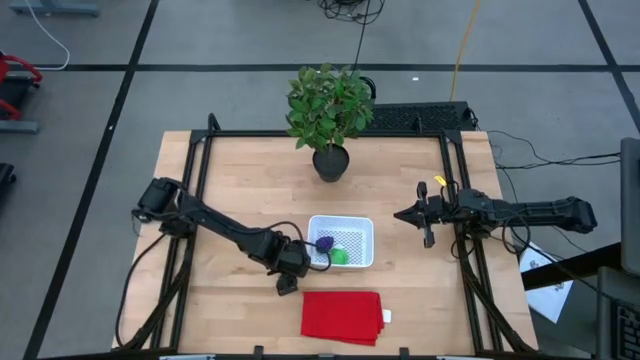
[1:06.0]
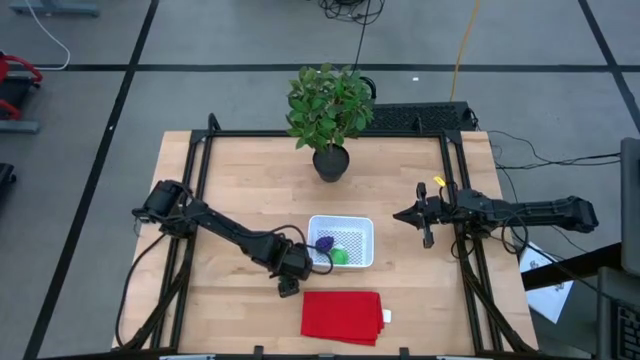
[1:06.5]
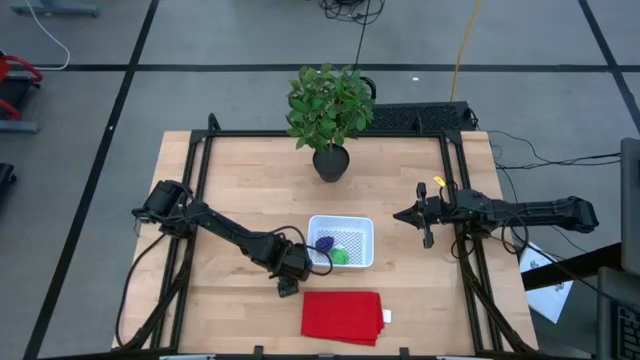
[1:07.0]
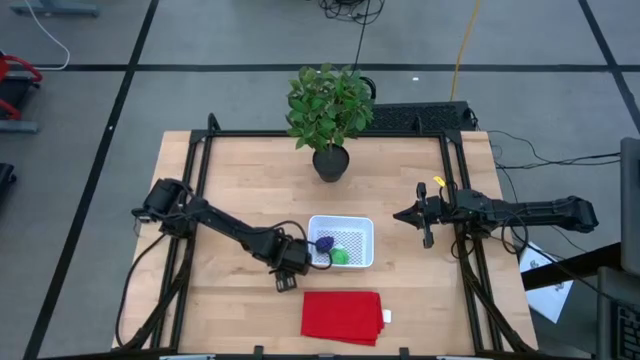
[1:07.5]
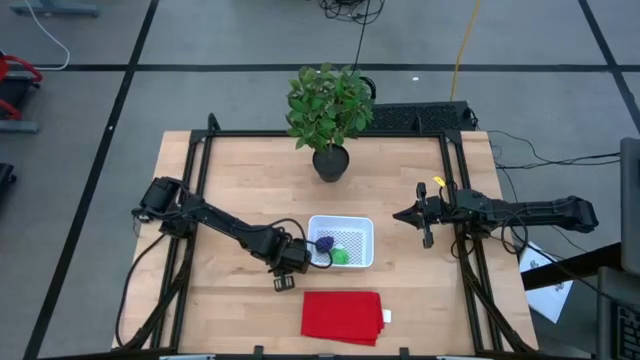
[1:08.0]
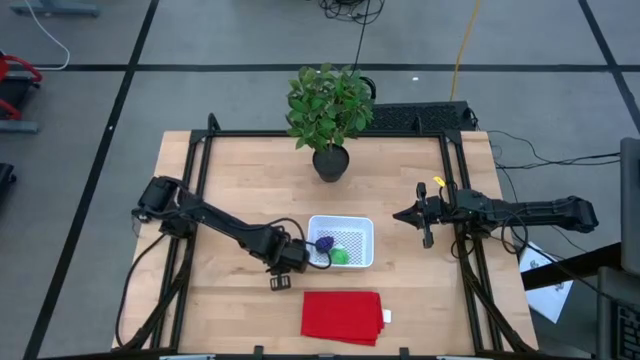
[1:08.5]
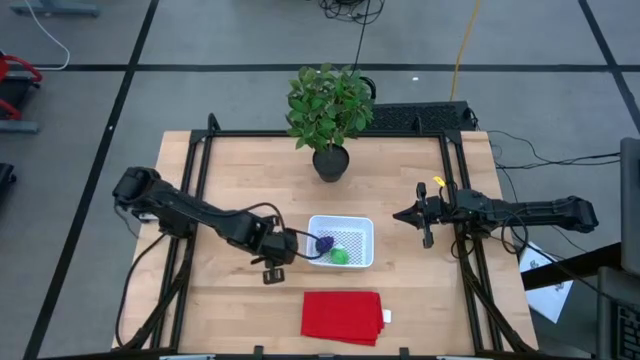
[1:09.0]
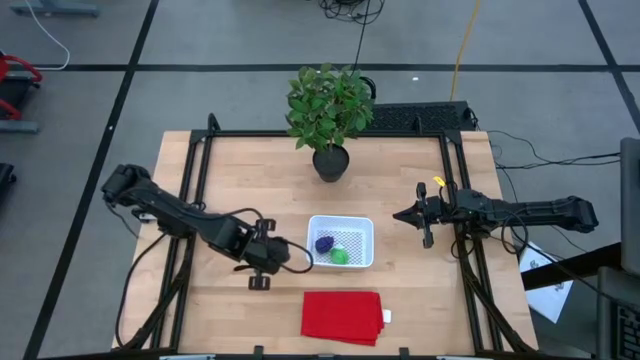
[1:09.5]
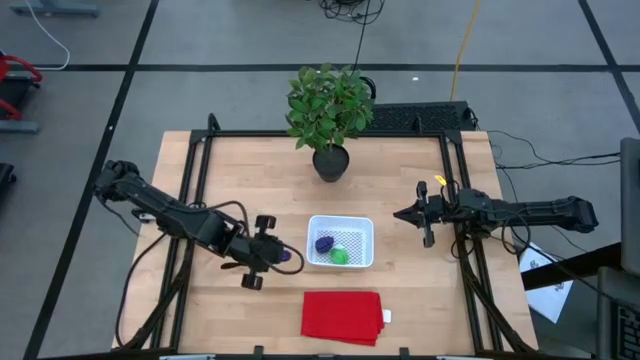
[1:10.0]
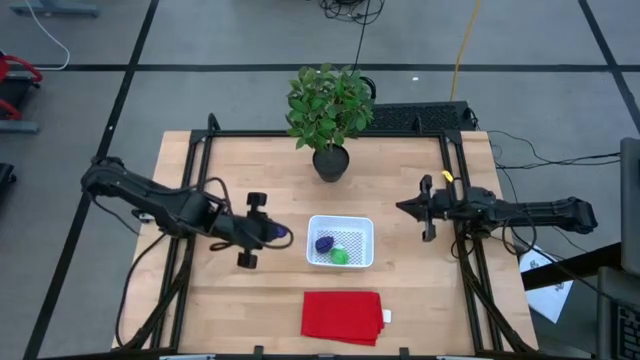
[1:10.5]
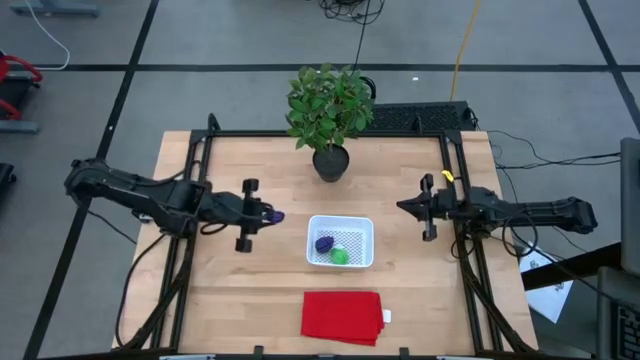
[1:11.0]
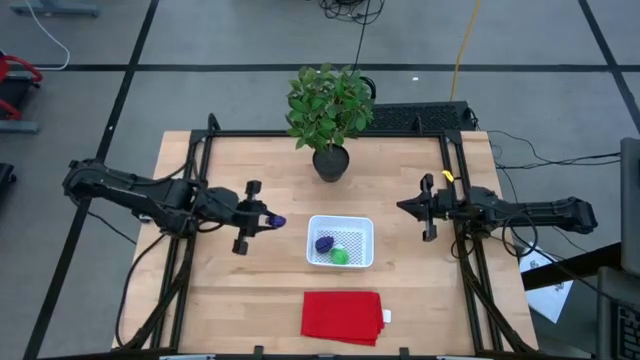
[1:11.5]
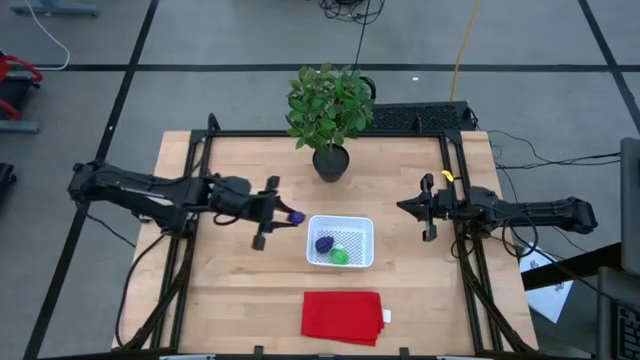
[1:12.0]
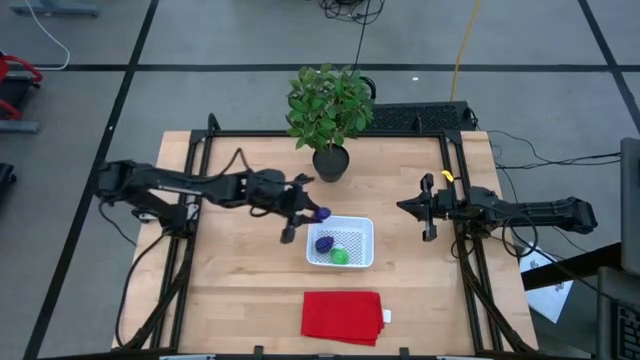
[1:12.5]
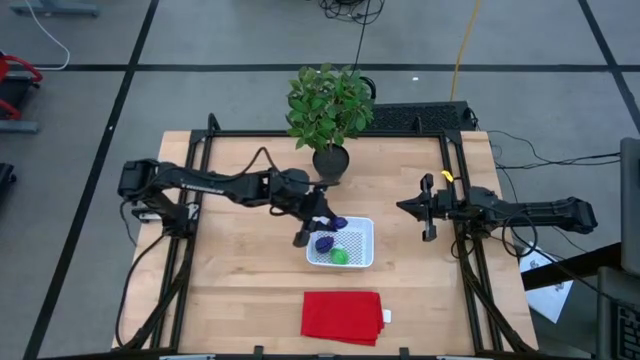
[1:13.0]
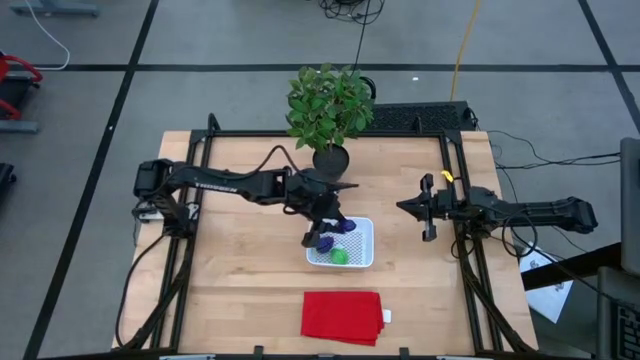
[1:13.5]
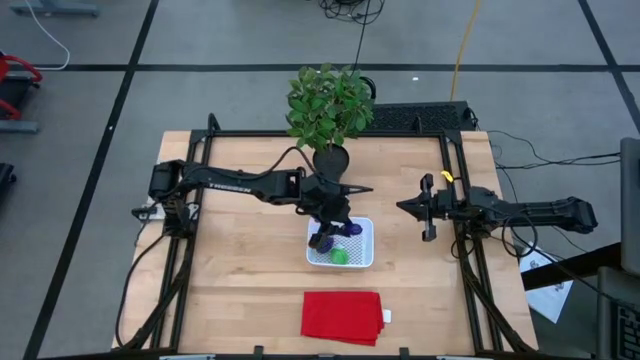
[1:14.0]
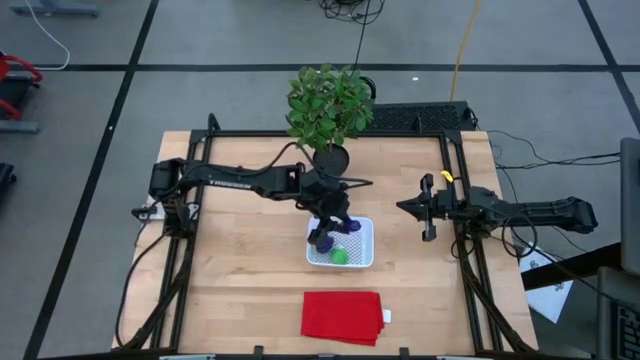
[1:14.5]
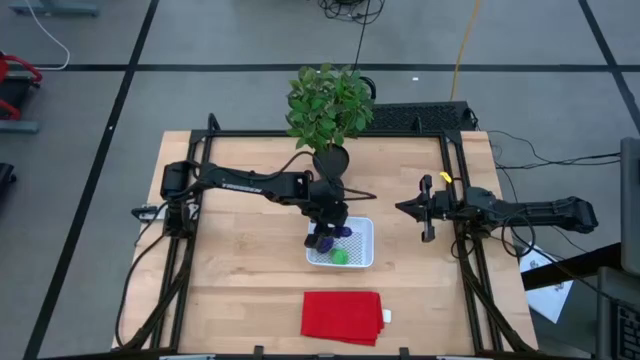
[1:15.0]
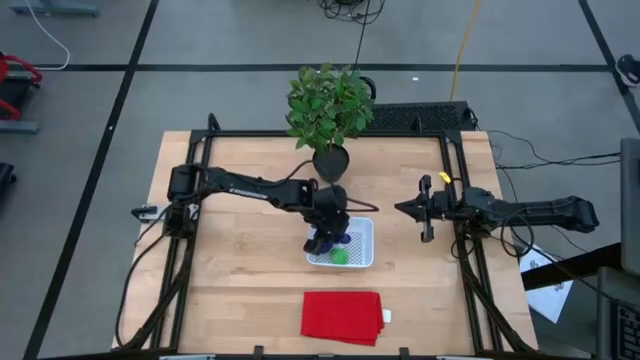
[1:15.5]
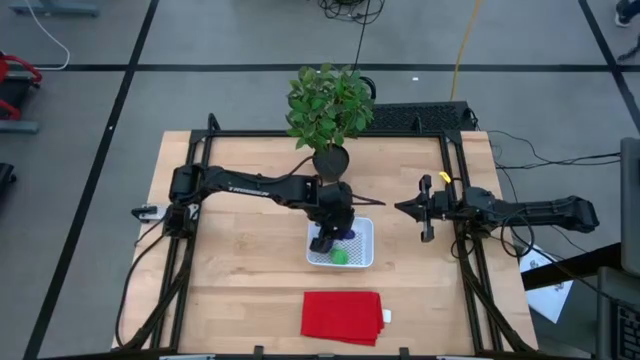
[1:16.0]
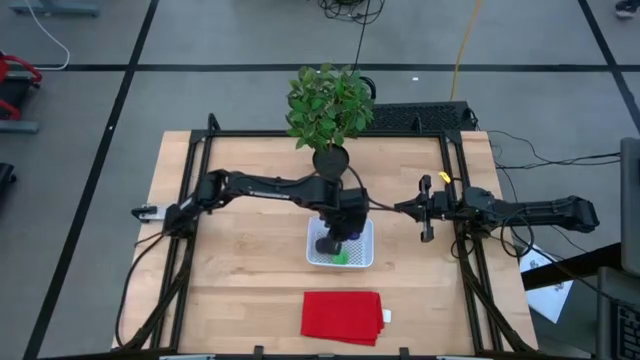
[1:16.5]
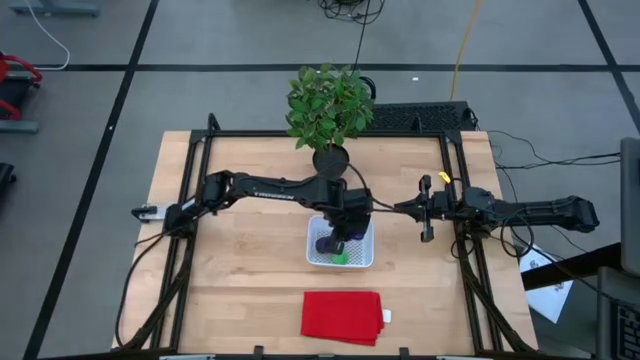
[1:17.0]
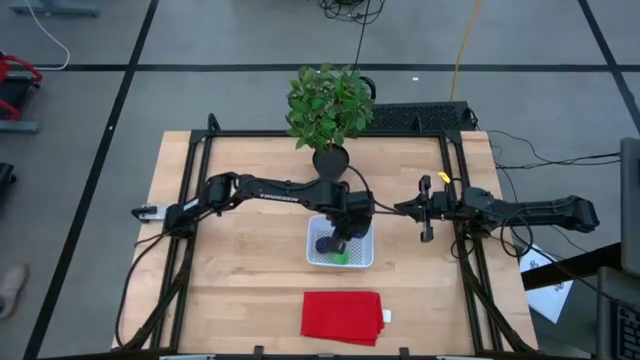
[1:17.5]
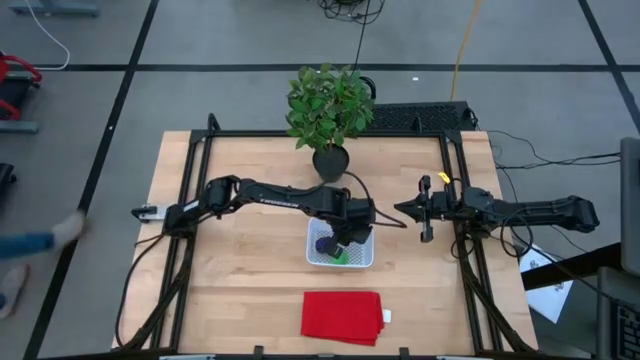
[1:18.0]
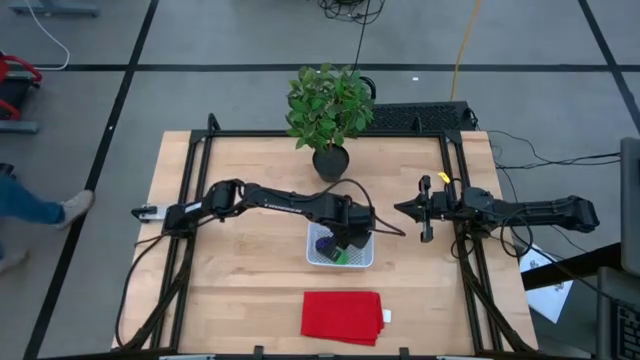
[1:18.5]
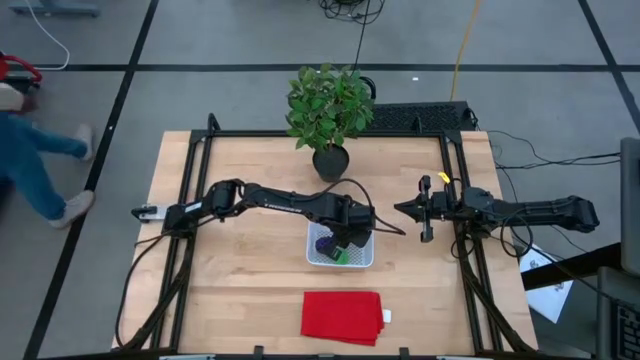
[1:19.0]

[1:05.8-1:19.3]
Task: Pick and placing Produce into tupperware
Put the violet eggplant into the white bin

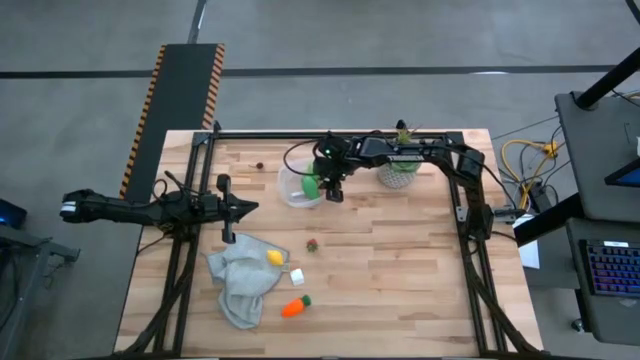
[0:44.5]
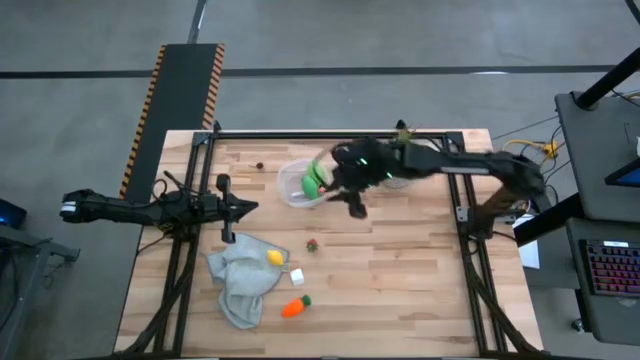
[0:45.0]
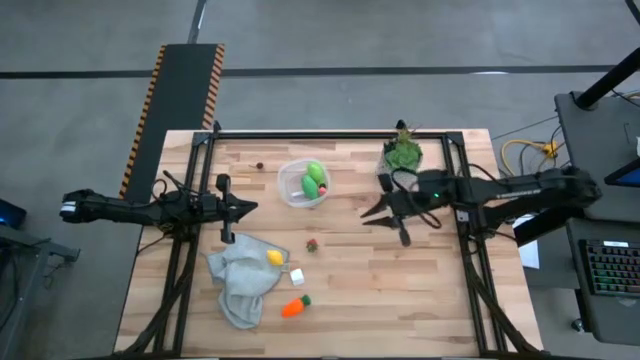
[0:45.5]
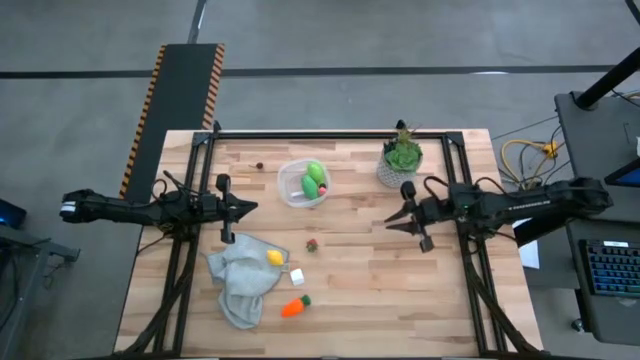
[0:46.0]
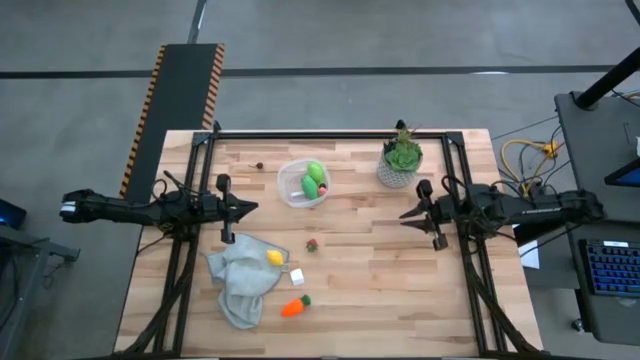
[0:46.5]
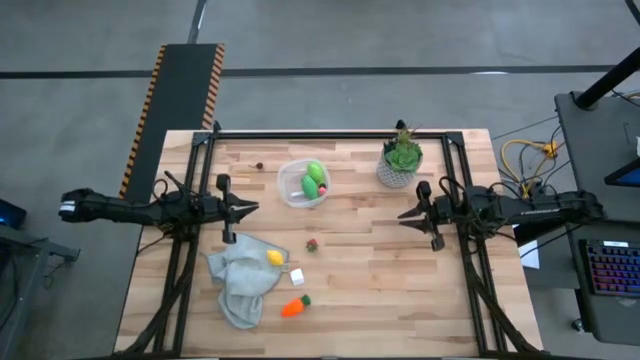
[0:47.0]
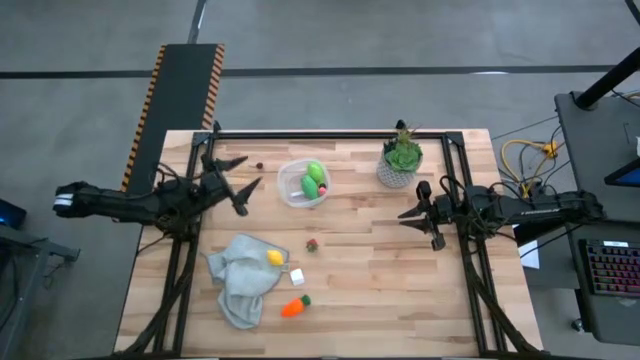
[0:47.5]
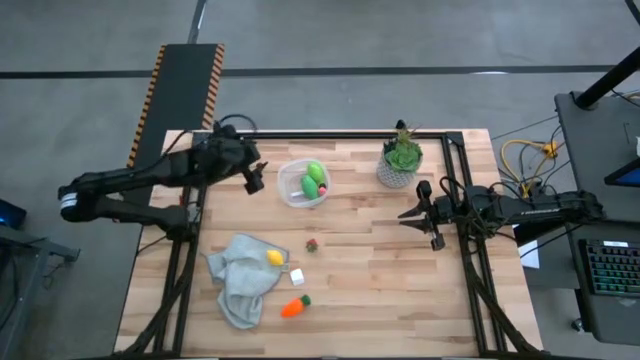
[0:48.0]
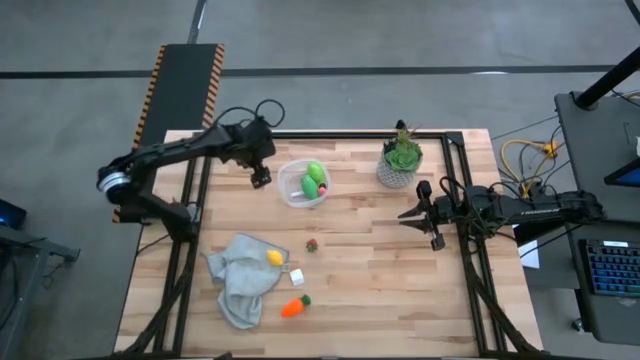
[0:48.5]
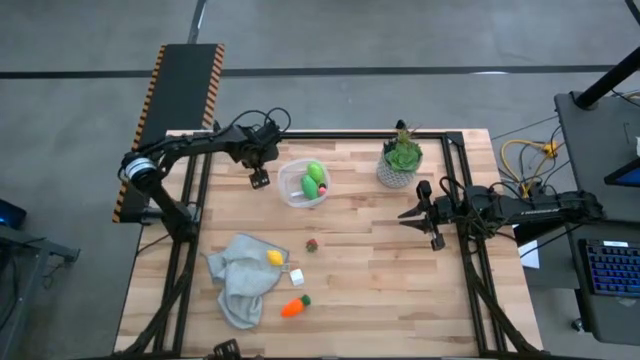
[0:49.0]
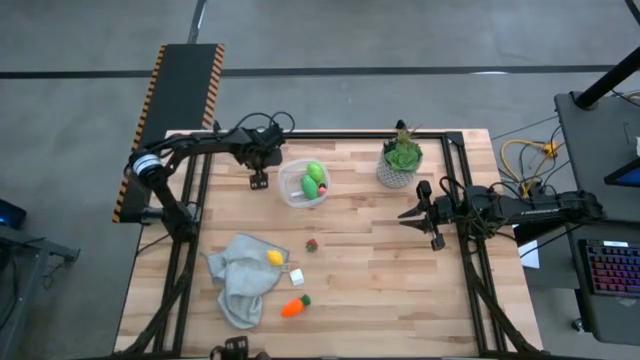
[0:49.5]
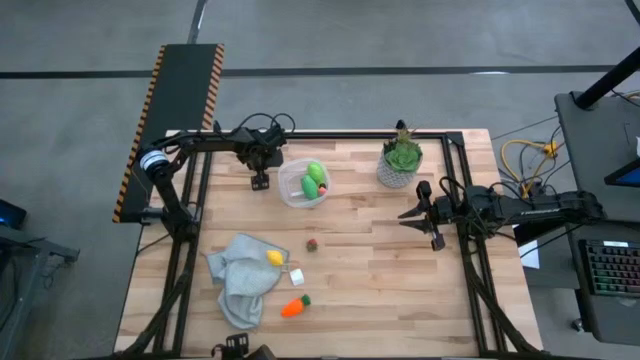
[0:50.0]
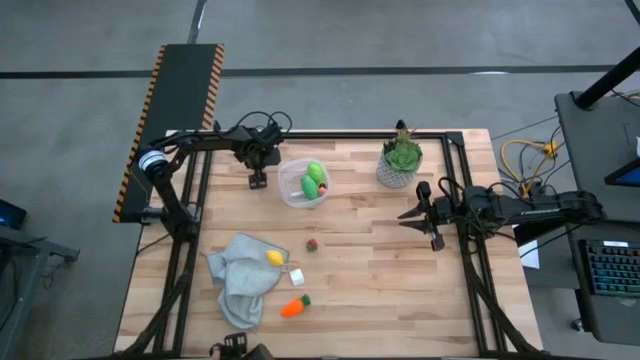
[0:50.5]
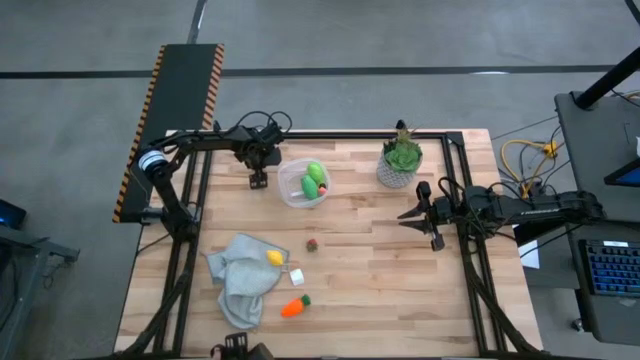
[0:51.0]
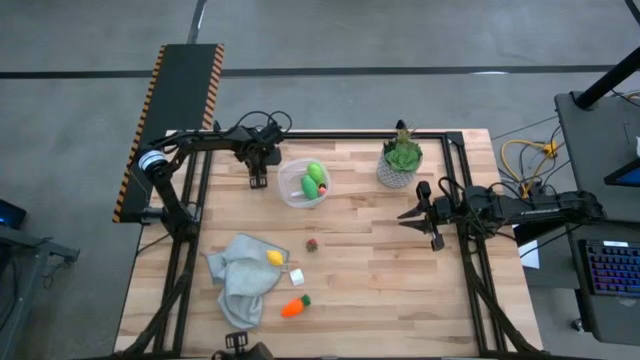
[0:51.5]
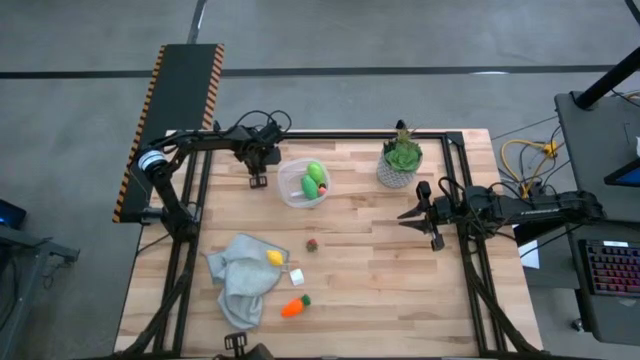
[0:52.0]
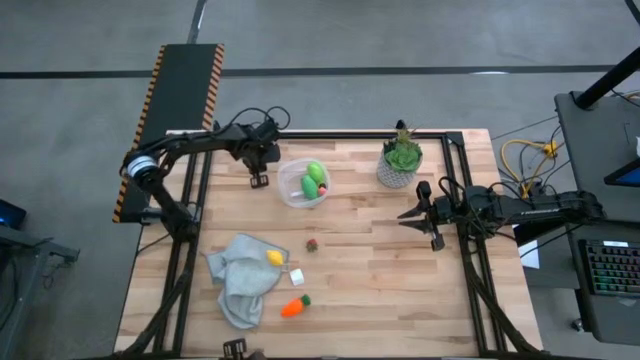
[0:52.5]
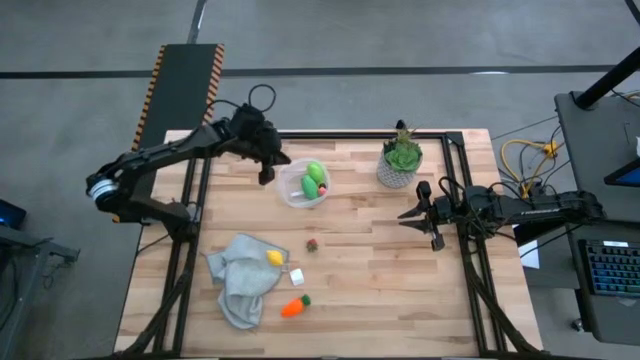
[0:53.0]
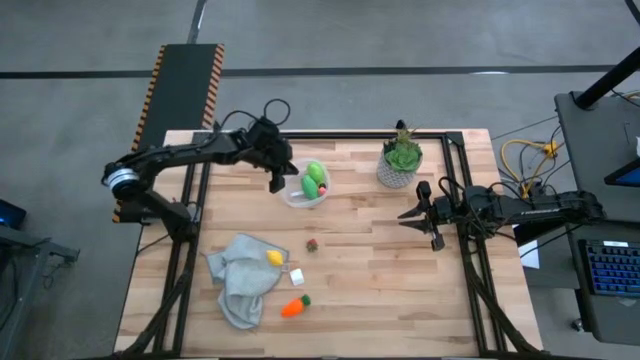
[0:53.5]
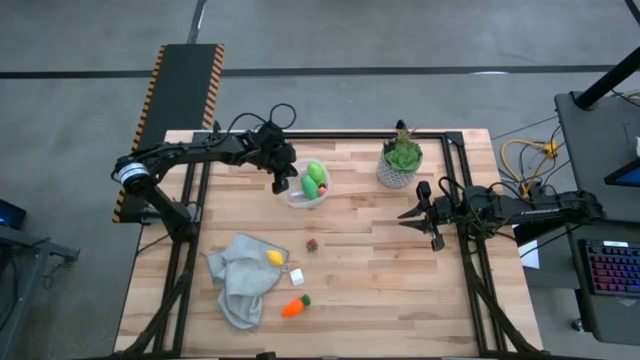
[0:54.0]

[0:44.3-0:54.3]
Task: Pick and placing Produce into tupperware
Put the red cherry into the transparent bin
